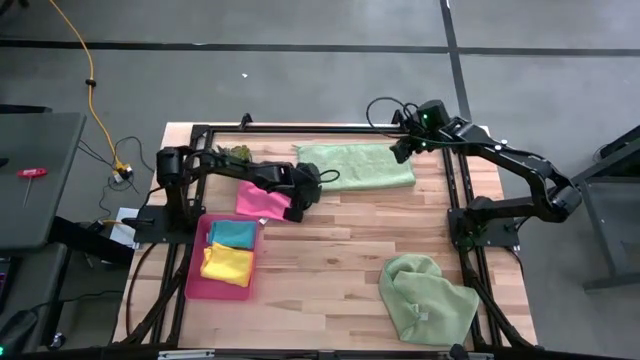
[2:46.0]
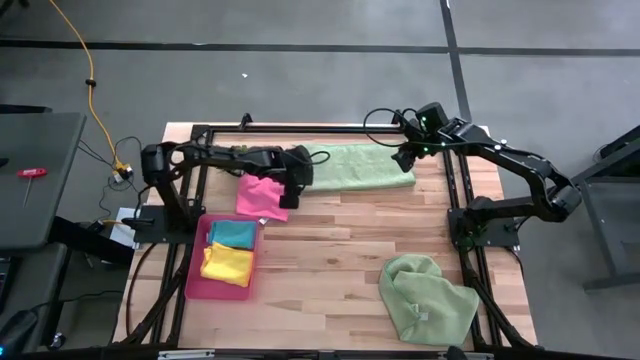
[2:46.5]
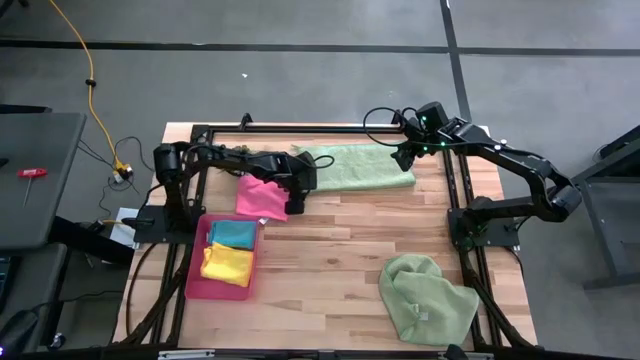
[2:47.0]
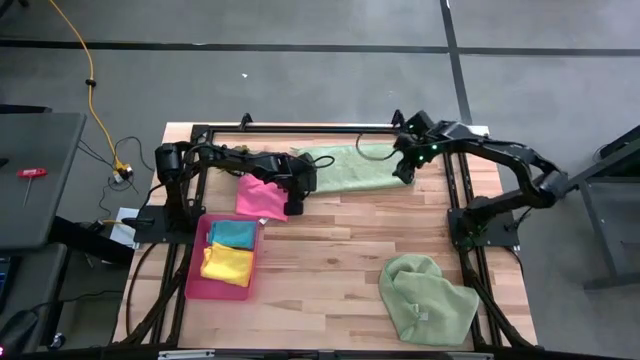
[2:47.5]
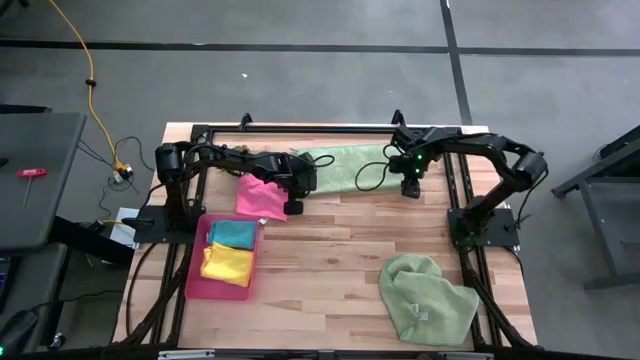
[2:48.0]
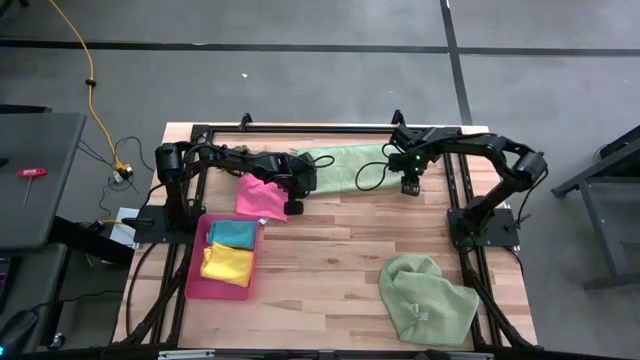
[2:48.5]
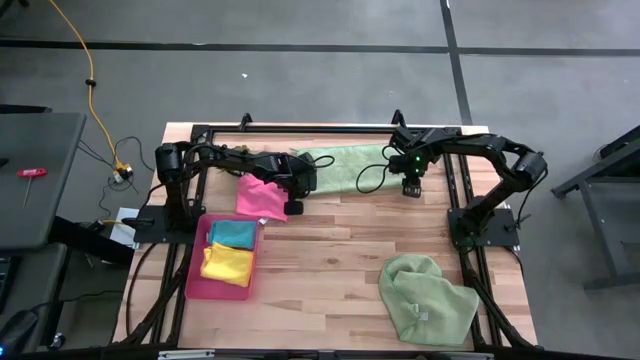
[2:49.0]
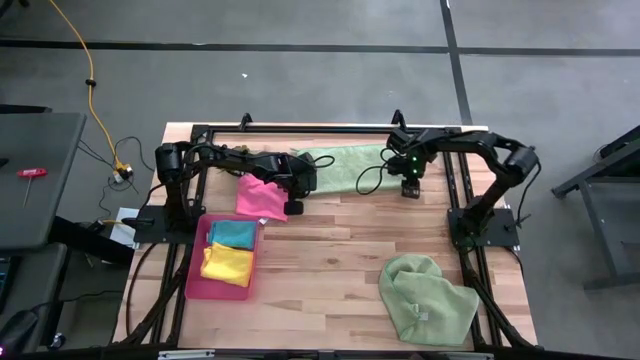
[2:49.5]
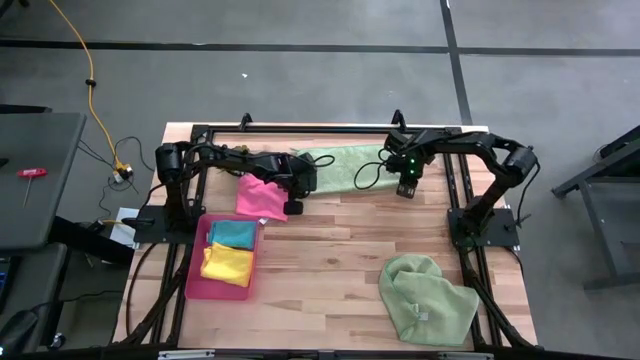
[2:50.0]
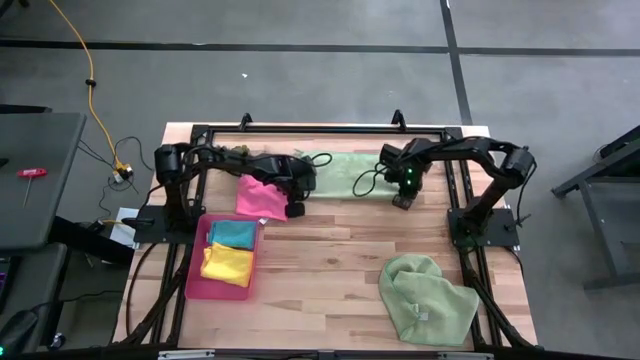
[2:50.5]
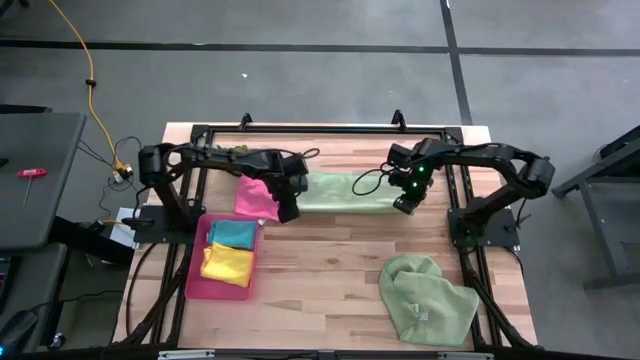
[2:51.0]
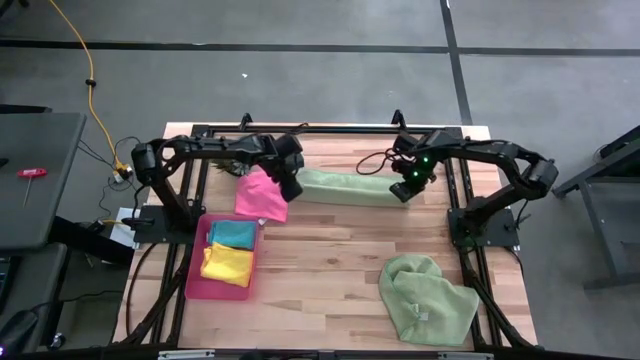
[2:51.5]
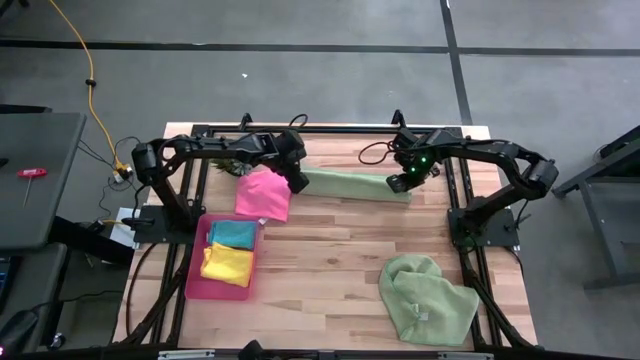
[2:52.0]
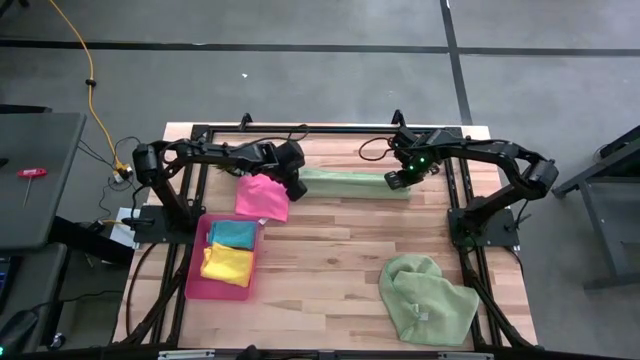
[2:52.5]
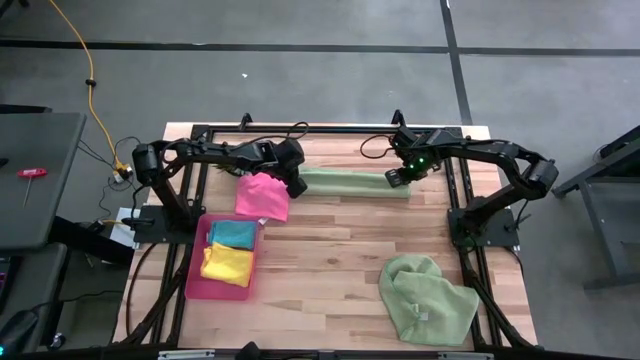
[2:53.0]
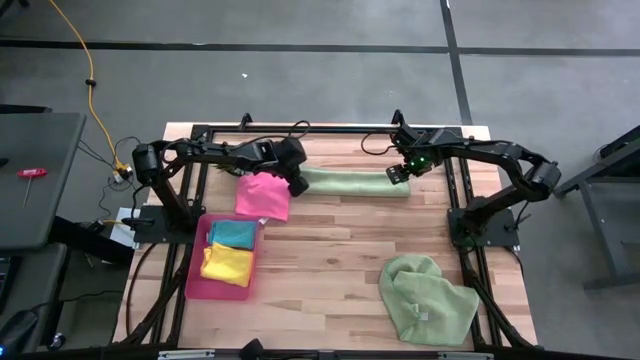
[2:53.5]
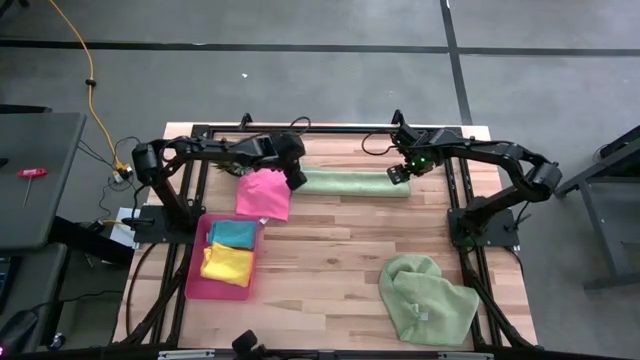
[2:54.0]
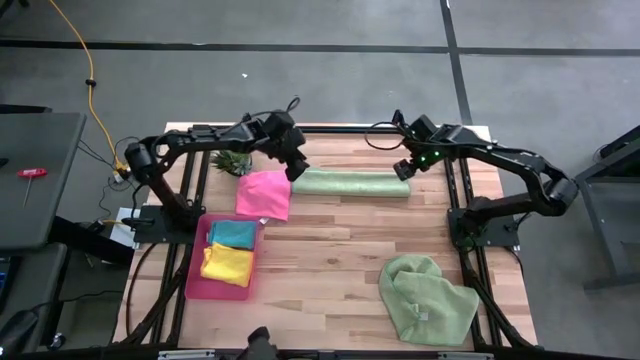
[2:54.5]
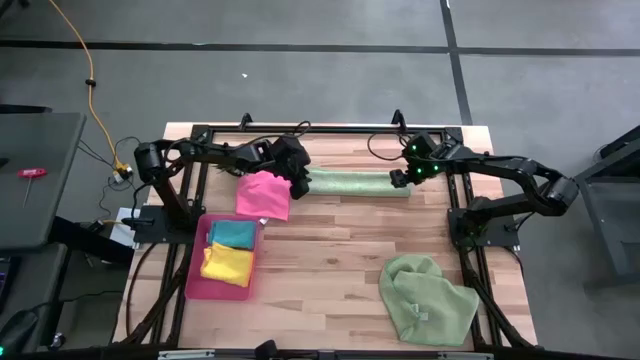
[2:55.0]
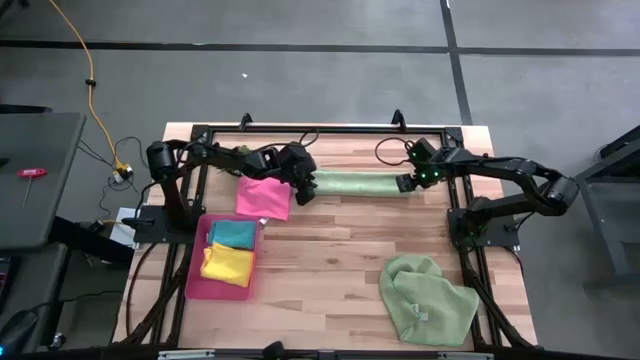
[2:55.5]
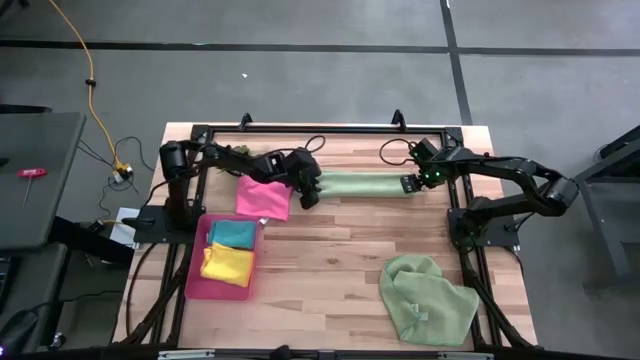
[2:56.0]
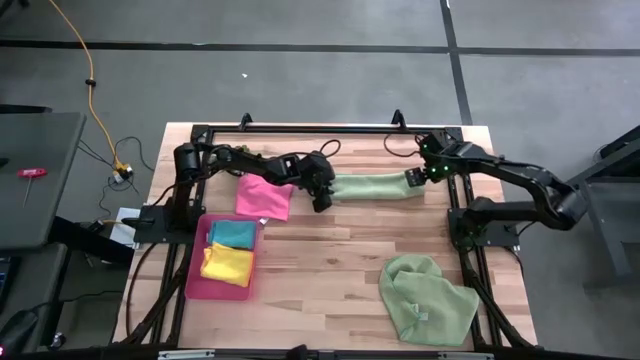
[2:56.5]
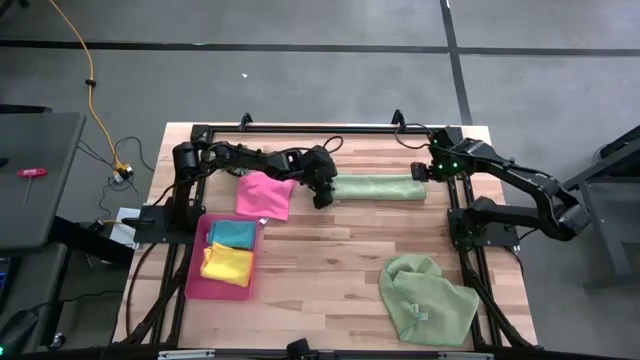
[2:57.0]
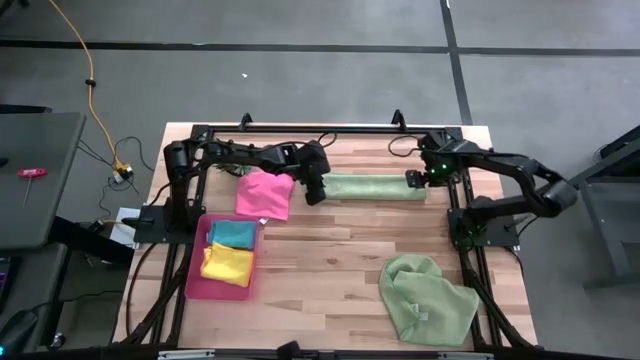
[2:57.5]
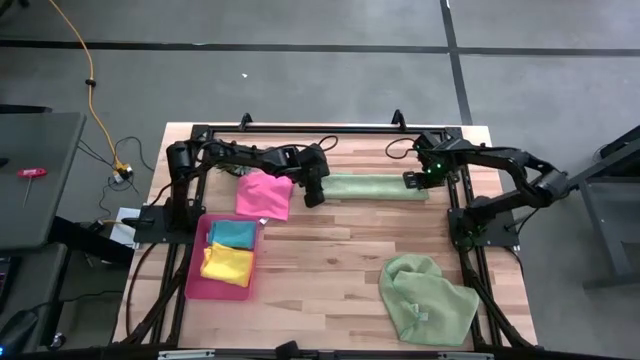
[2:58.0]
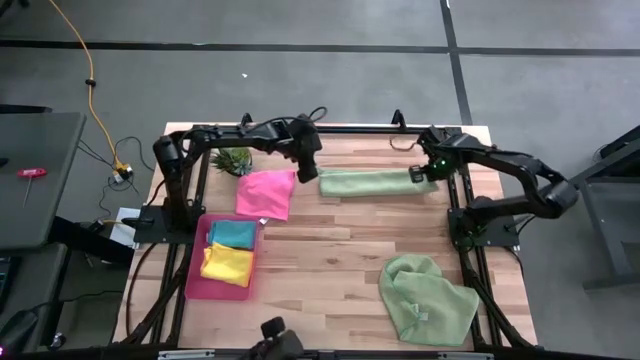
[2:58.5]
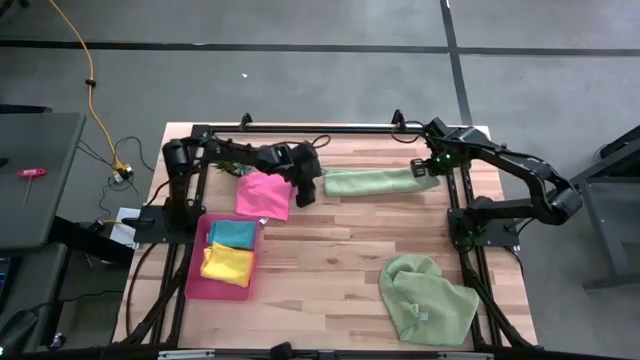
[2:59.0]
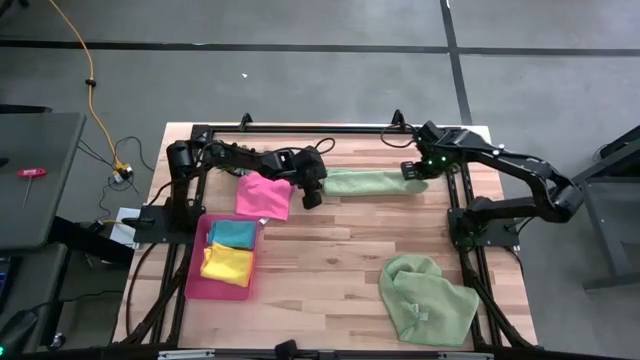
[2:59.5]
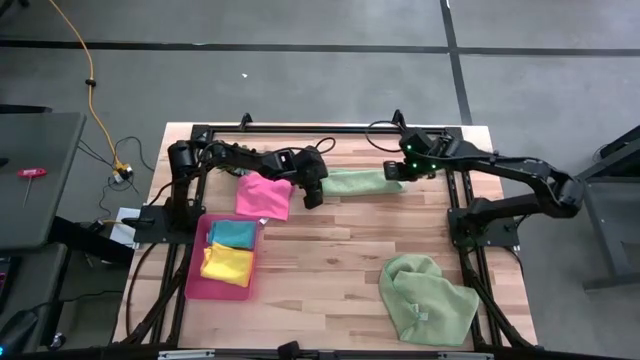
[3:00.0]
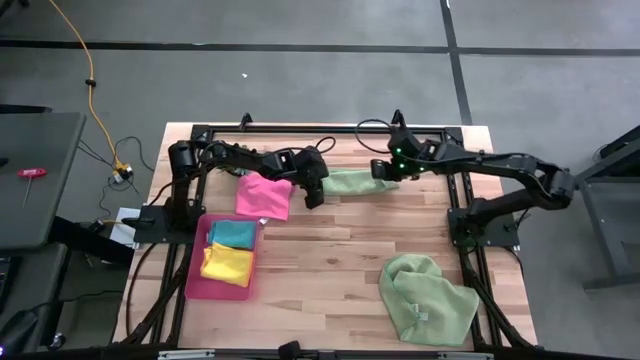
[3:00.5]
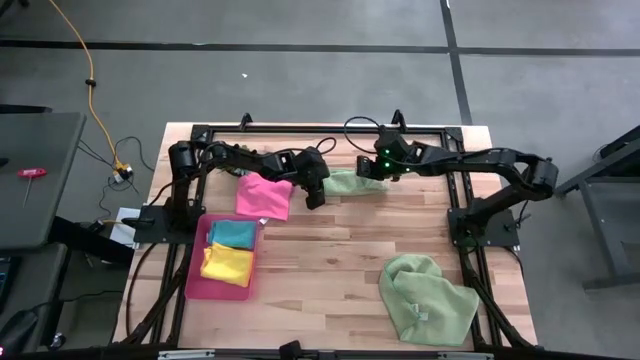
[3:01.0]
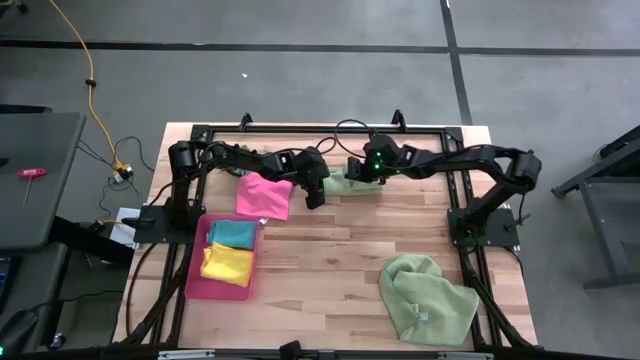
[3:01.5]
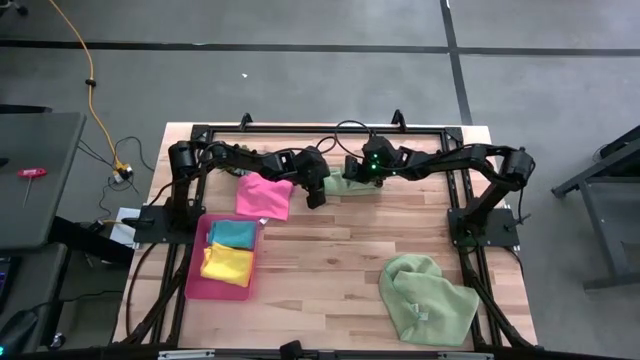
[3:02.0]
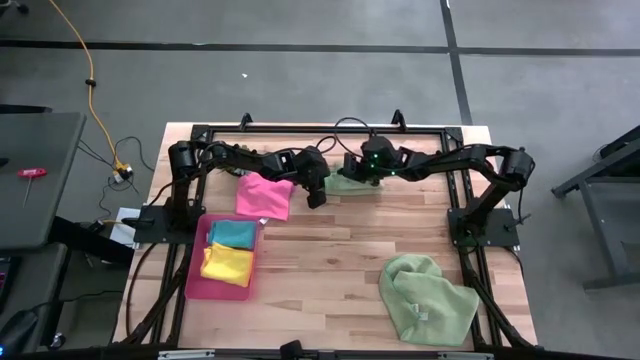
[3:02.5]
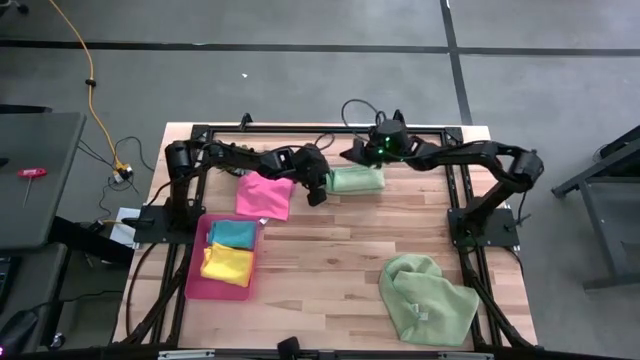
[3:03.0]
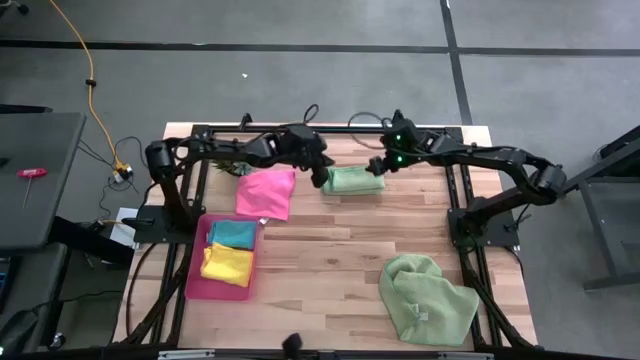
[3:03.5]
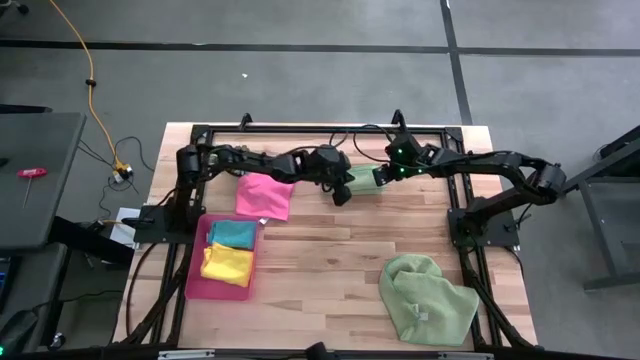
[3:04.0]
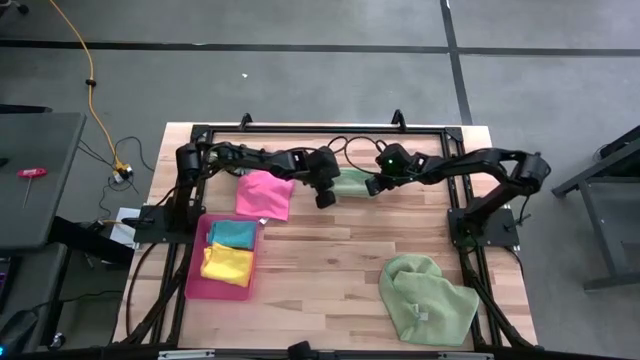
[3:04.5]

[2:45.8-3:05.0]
Task: Fold microfiber towels
Fold the top green microfiber towel
